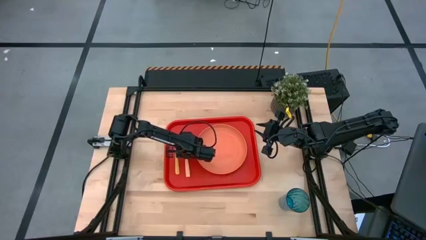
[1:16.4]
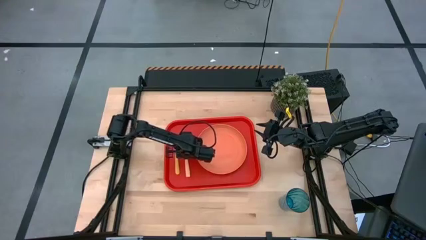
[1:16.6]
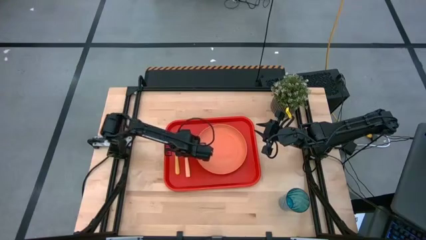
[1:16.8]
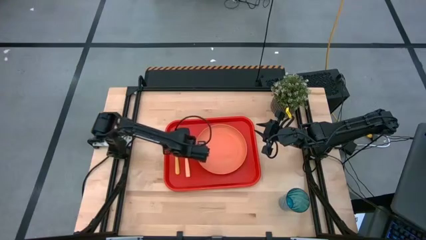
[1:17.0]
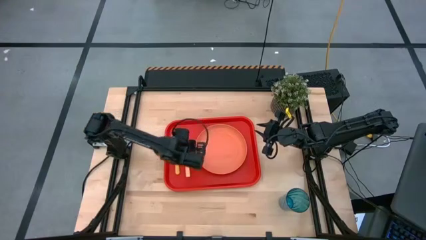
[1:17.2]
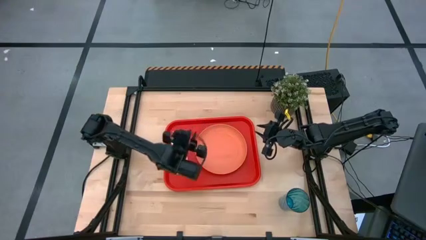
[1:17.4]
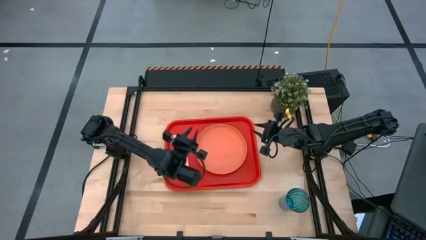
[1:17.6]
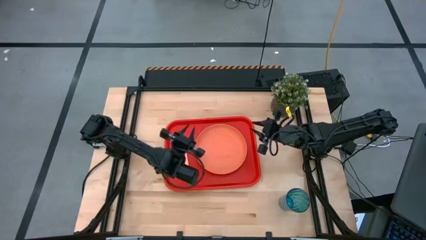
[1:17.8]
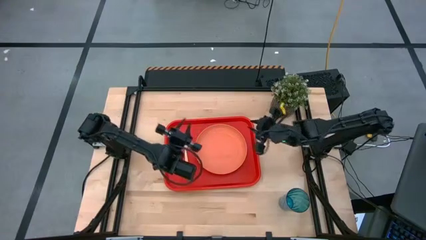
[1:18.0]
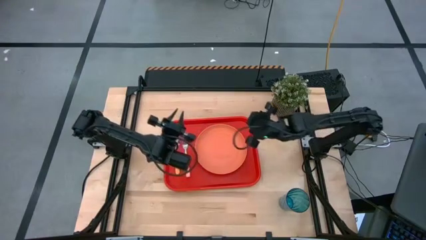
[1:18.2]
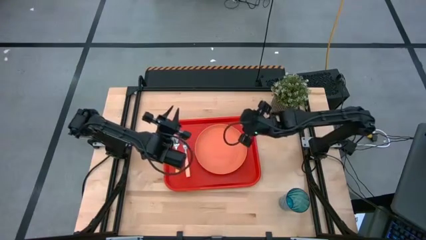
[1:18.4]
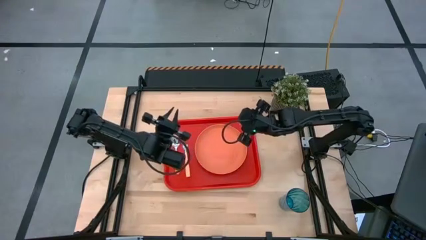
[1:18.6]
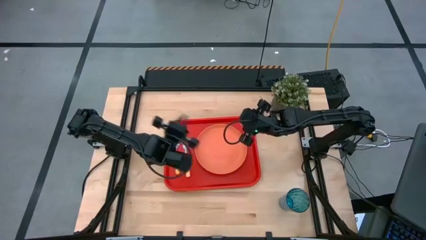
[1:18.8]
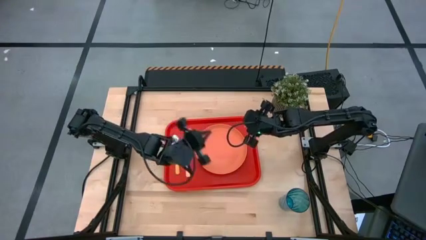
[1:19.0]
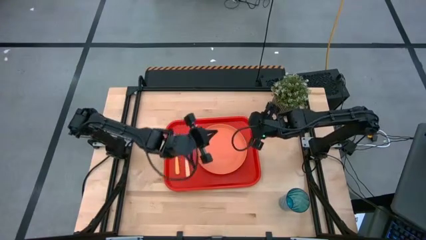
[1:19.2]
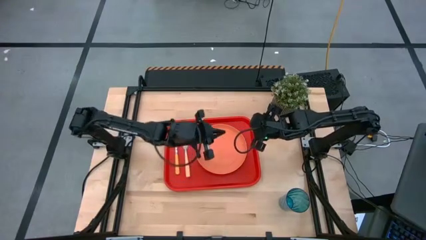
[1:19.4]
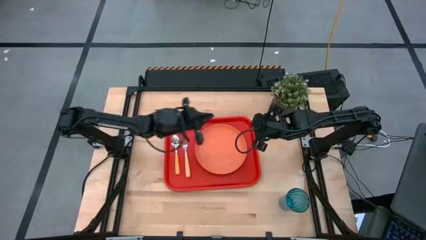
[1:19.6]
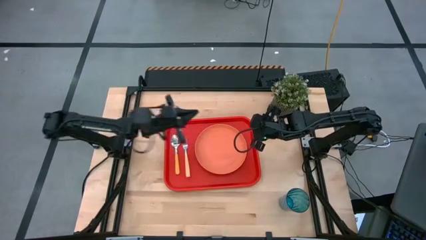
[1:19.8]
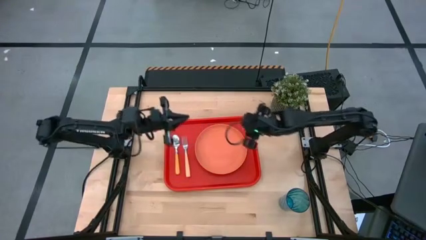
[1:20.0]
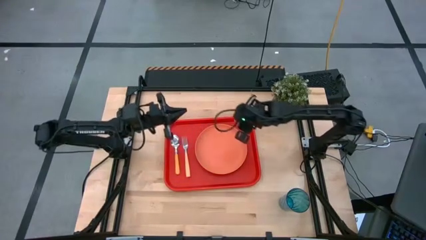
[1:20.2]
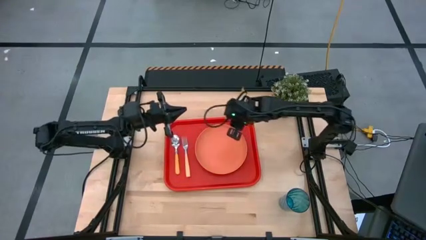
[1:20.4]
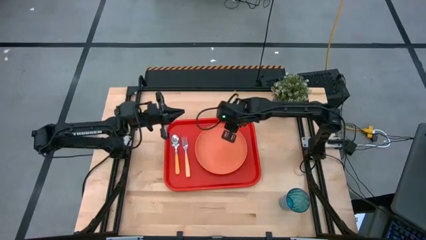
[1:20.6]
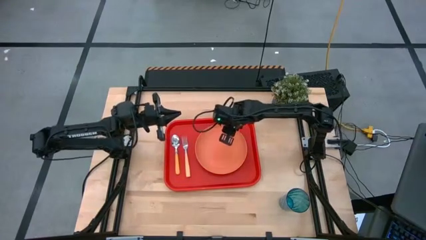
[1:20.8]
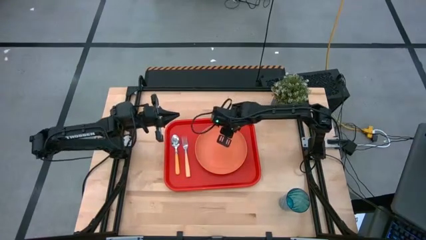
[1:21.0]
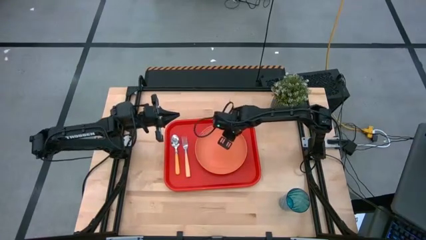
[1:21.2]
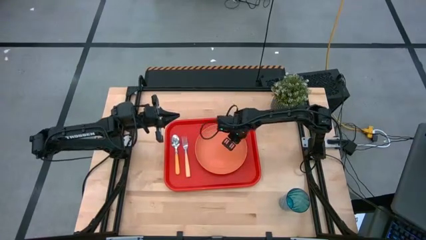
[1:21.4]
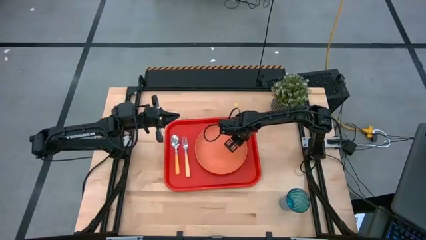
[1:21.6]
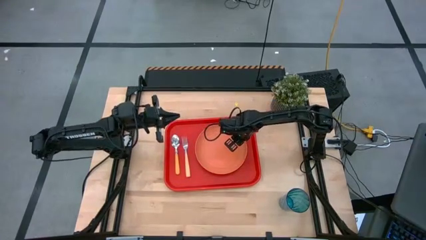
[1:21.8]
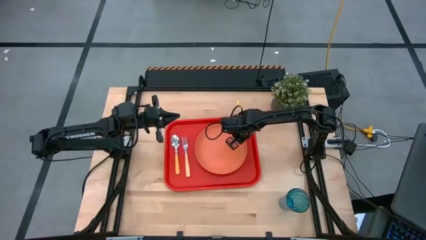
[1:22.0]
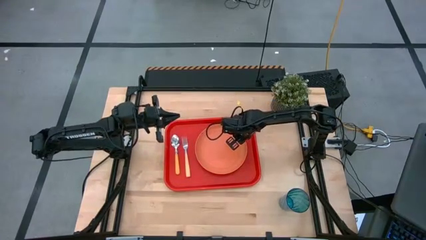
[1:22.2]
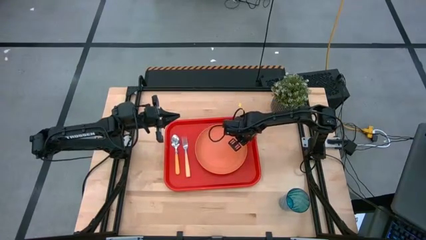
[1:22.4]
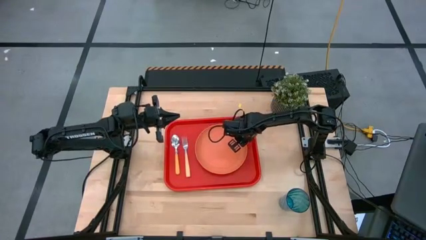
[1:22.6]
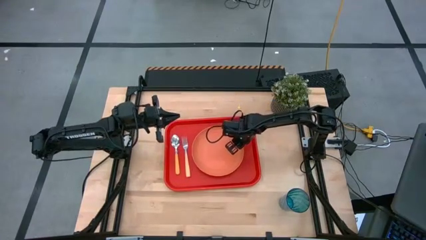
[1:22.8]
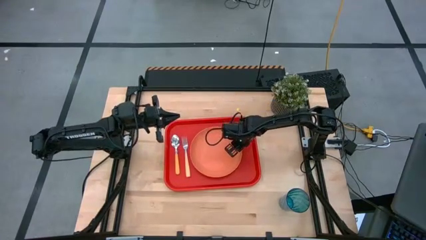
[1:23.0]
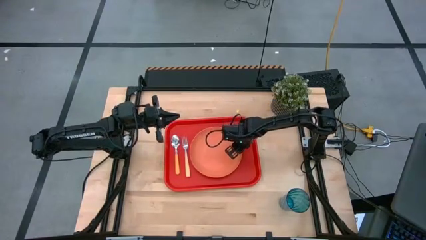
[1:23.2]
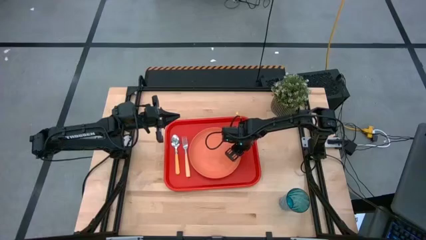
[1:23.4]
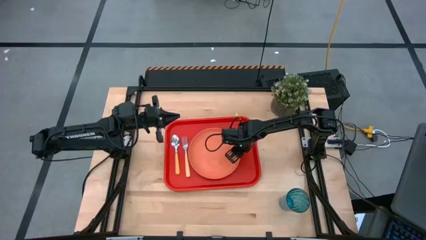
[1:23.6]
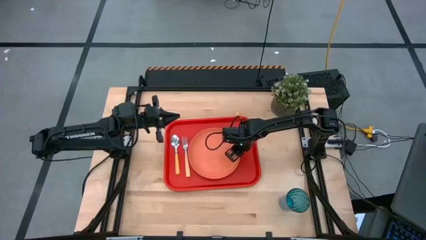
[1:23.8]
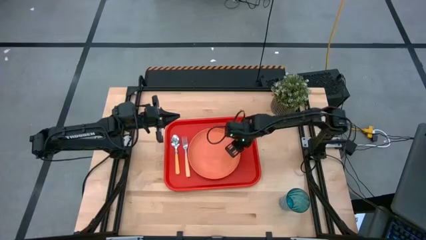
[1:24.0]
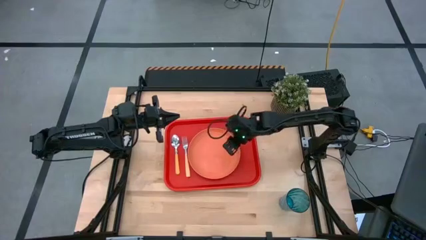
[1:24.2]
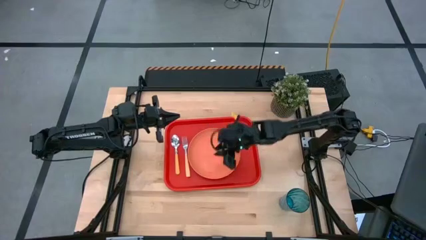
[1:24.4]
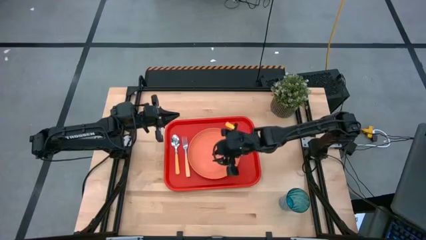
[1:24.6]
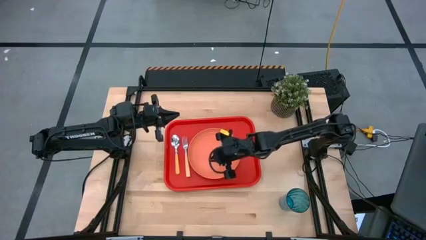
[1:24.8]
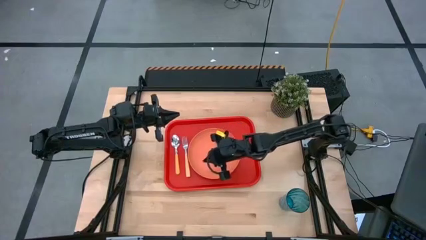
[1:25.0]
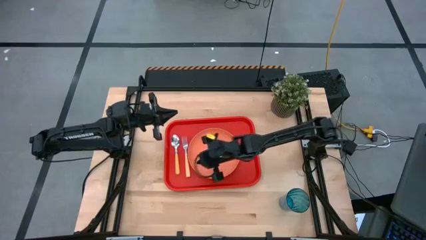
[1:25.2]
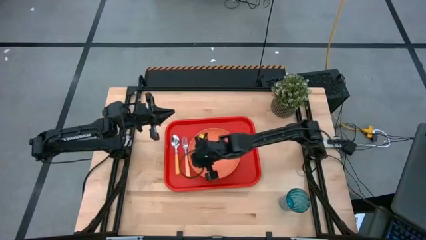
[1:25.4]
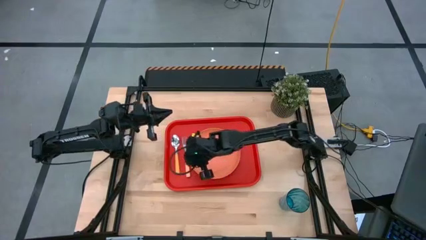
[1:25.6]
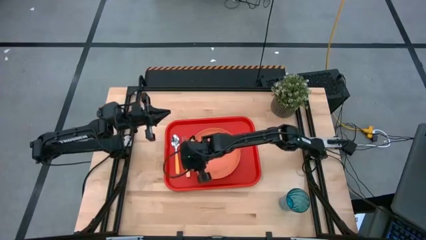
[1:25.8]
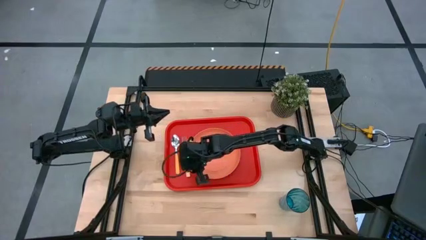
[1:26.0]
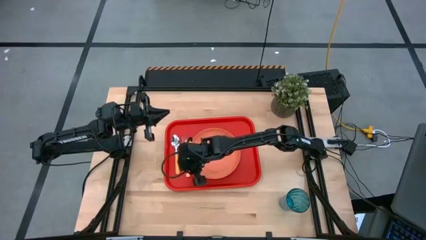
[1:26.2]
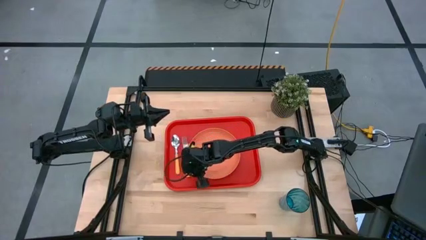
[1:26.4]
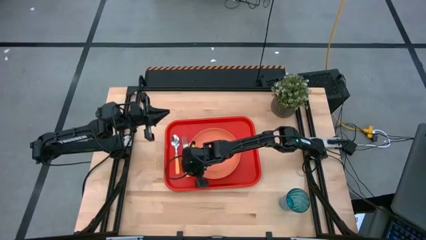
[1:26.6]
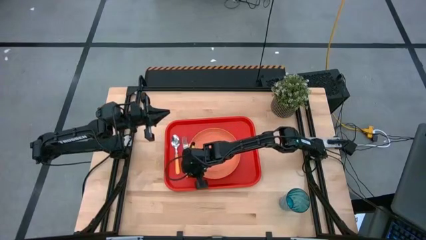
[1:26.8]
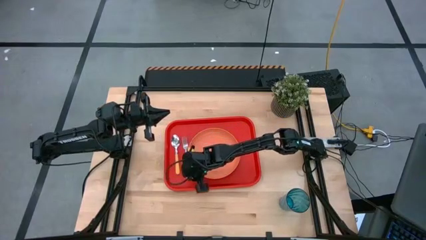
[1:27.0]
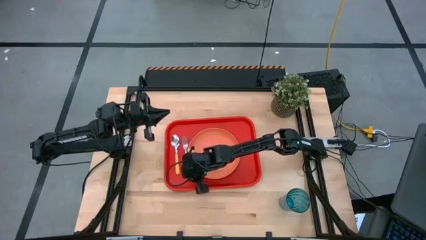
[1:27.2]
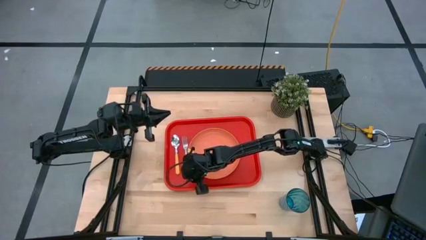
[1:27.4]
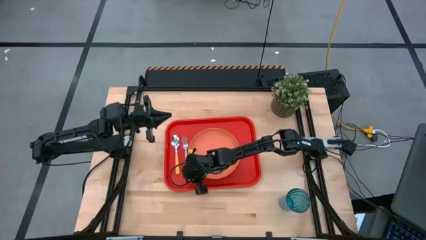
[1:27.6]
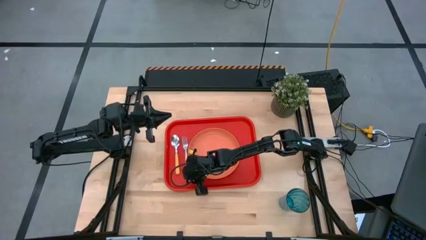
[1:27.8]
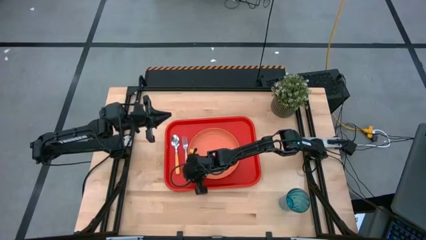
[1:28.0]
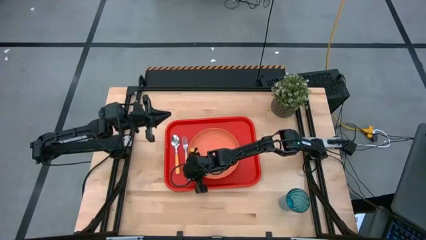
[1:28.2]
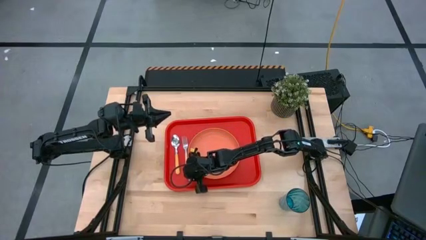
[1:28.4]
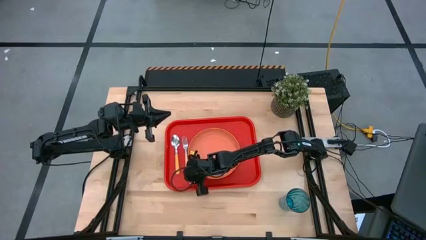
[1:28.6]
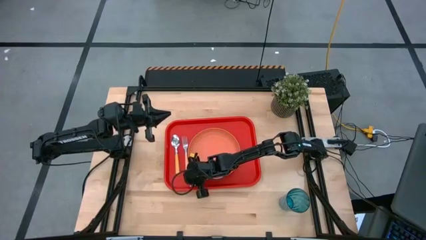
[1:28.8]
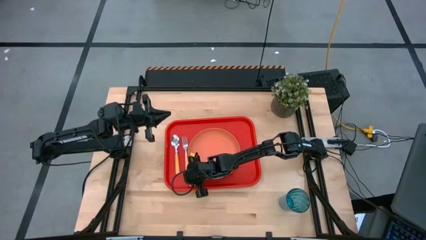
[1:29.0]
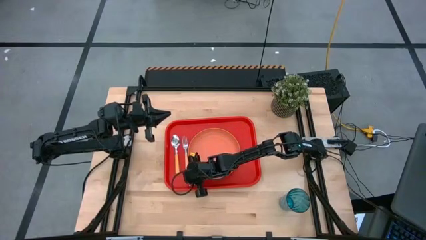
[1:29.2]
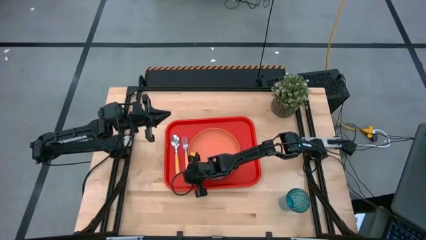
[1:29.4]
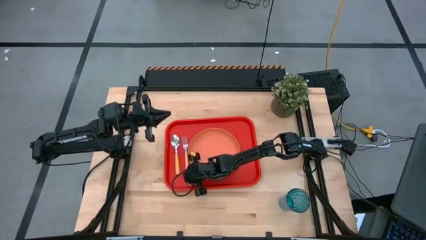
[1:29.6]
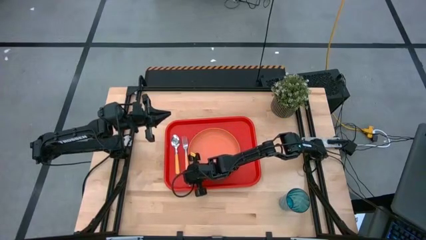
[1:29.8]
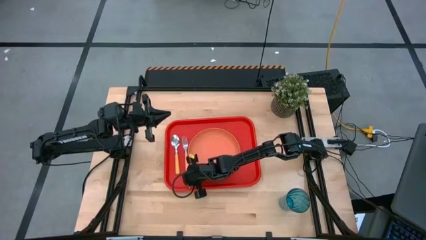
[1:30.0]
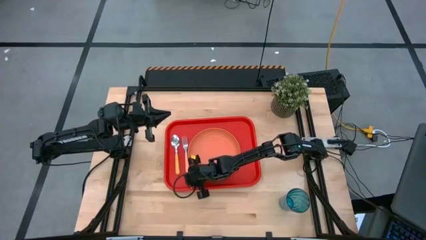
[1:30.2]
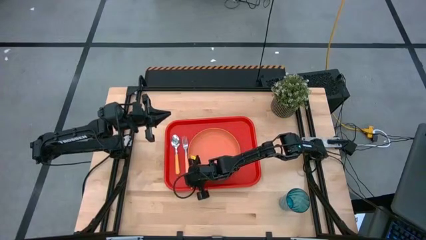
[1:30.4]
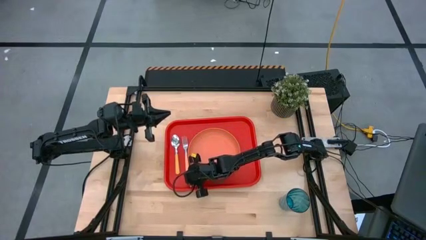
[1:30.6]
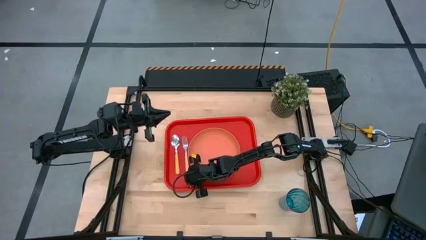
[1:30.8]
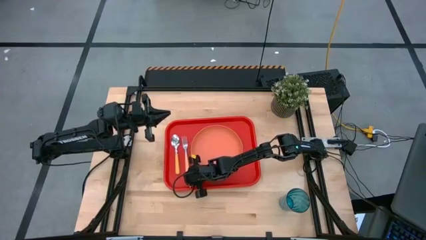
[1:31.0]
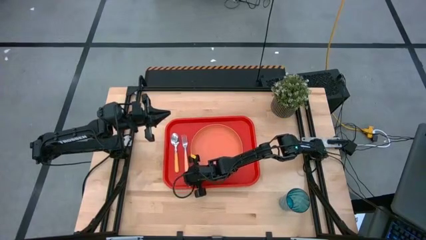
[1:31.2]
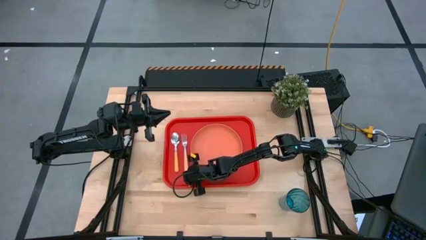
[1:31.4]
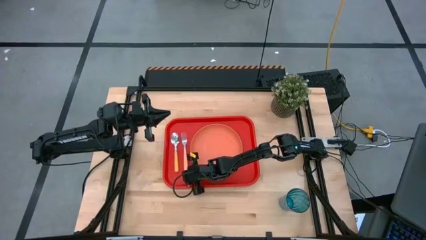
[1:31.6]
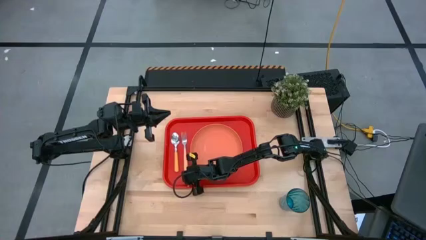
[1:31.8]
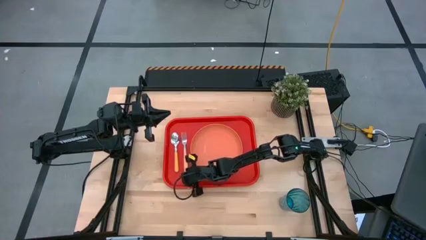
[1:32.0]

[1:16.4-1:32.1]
Task: Pick and place plate/cup/fork/spoon on tray
Adjust the light orange plate on the orange serving tray
